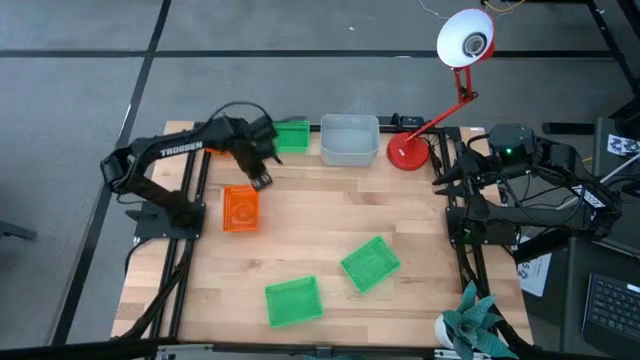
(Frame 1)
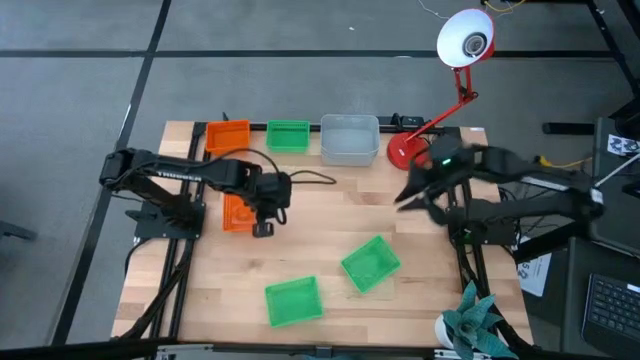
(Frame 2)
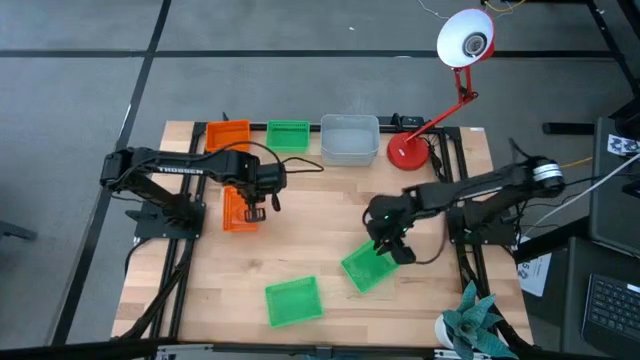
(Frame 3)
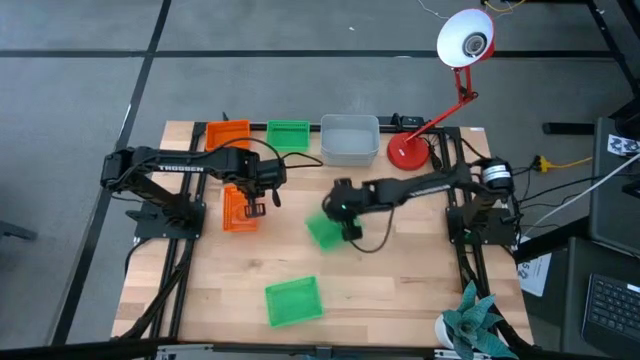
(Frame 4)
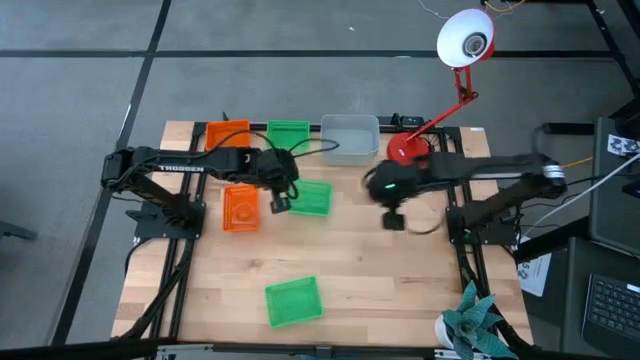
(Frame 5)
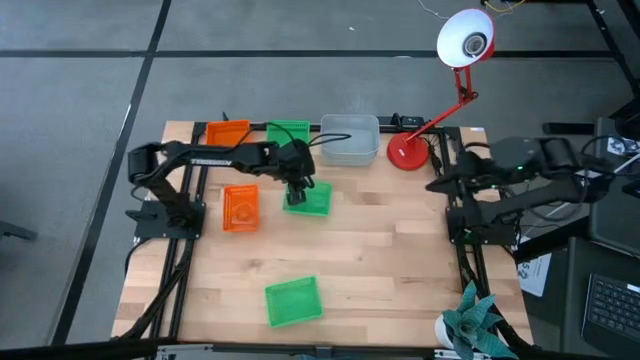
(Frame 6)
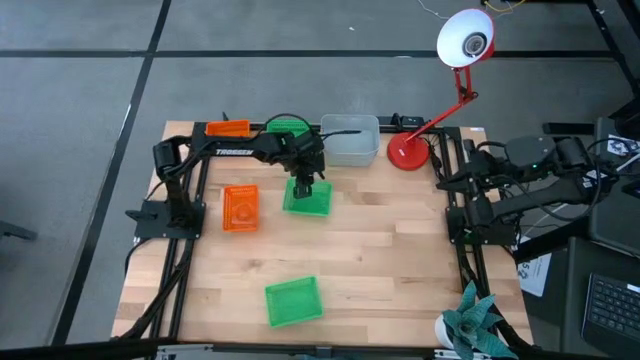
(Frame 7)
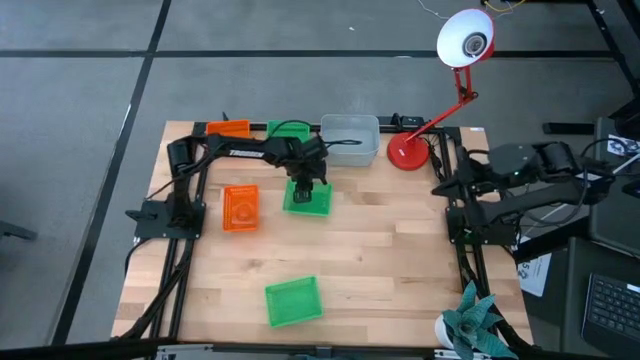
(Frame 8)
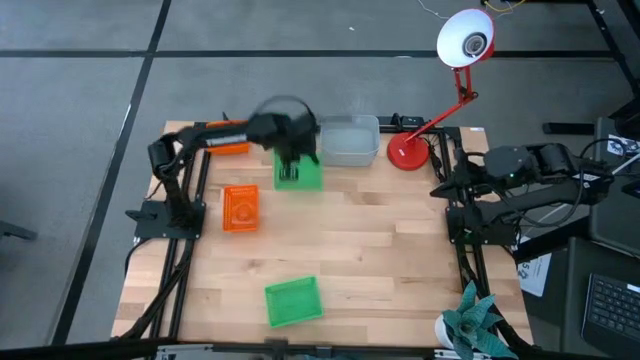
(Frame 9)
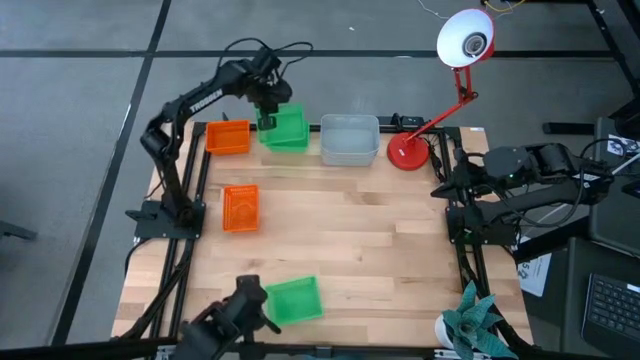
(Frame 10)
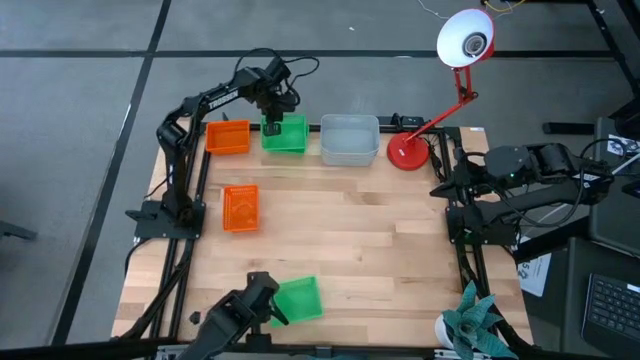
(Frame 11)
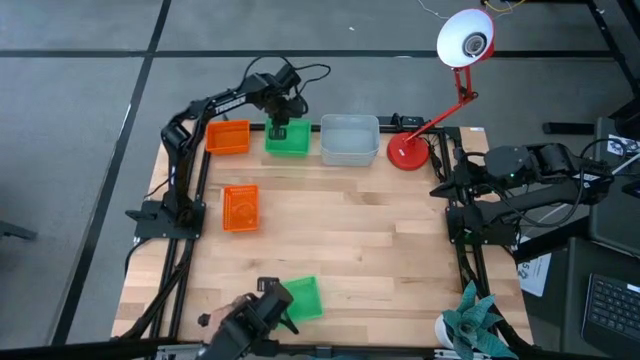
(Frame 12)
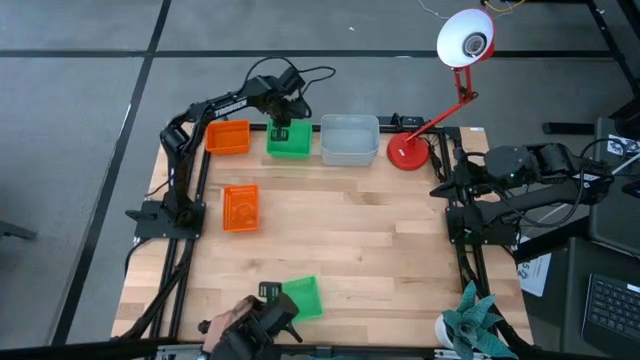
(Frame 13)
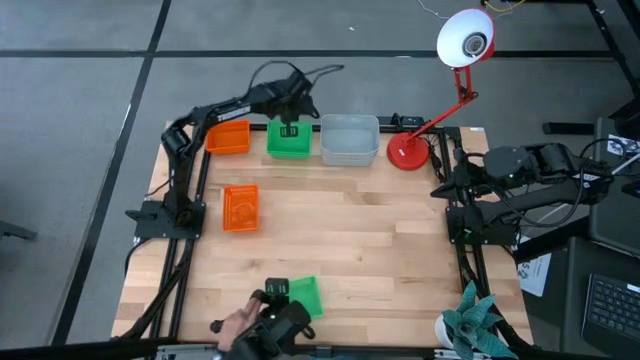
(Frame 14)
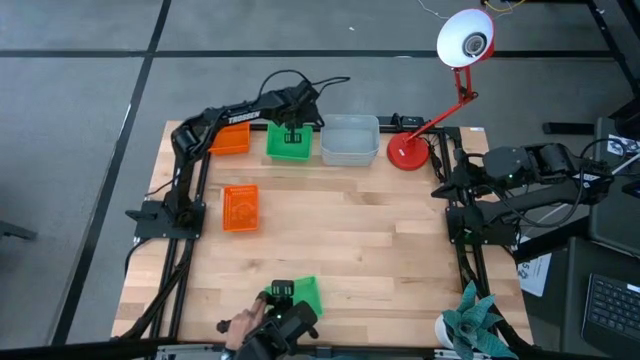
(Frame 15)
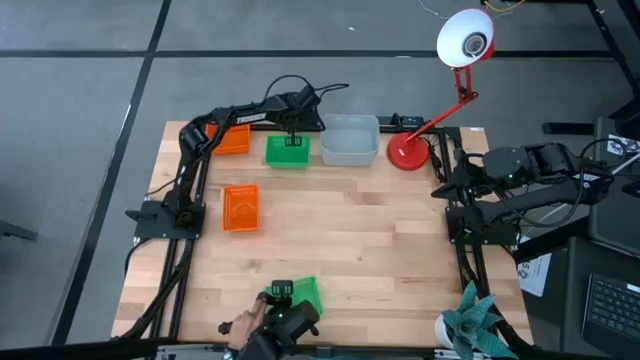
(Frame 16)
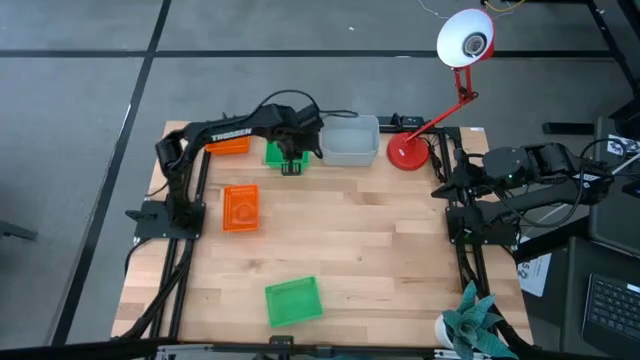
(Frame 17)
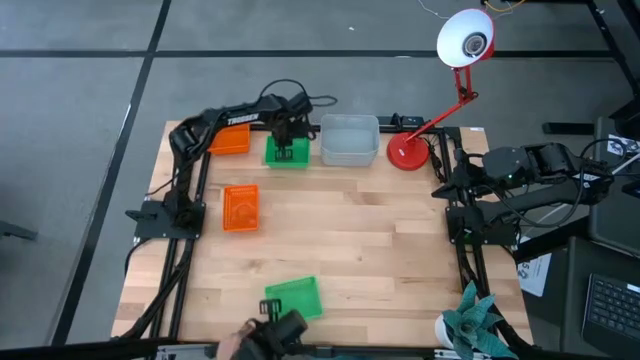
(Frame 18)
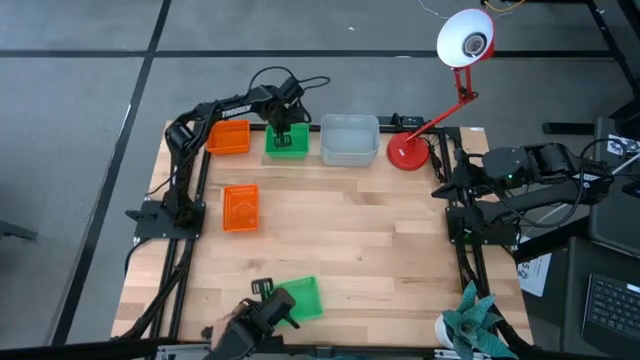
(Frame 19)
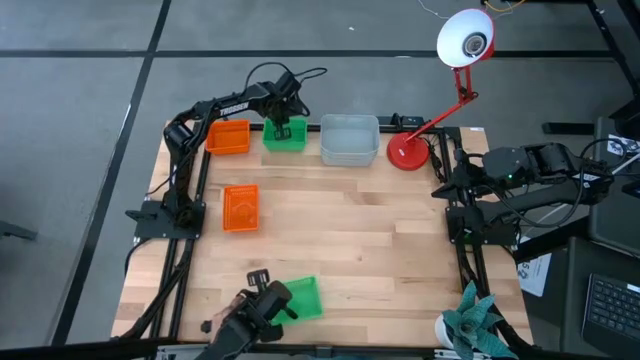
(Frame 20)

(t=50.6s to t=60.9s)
Stack the bottom right green bin on top of the top green bin

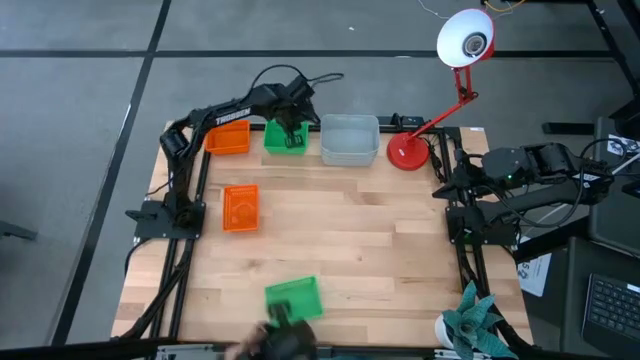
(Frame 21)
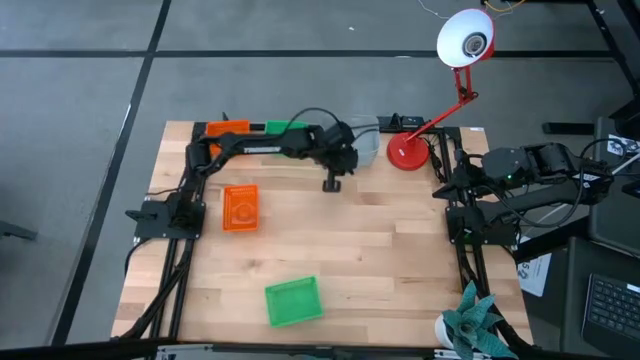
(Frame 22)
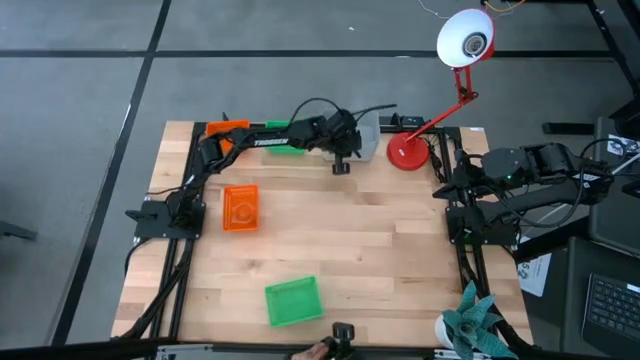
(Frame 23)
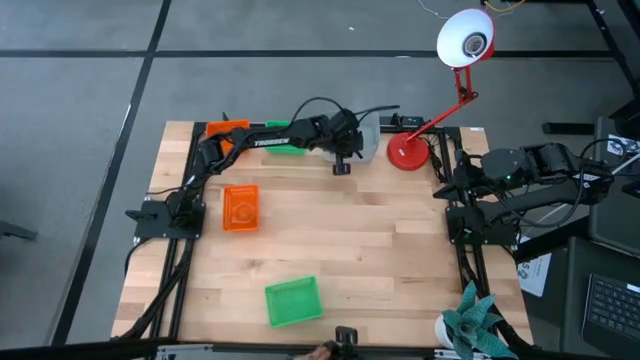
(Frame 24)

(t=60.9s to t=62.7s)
Adjust the stacked gray bins

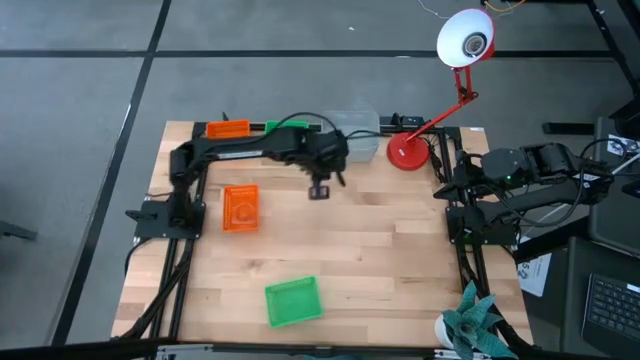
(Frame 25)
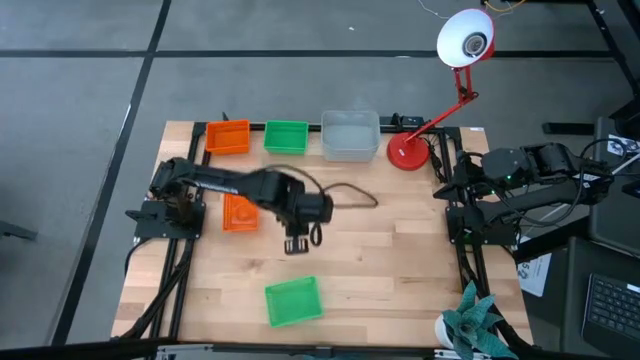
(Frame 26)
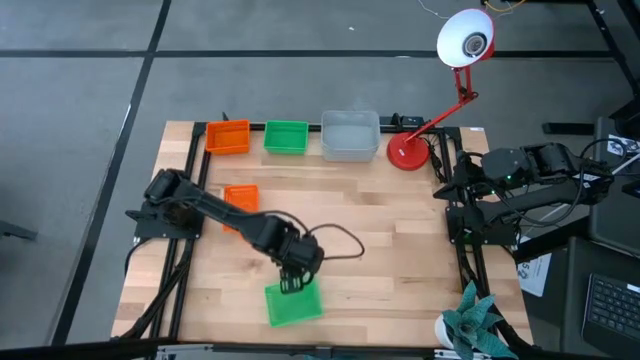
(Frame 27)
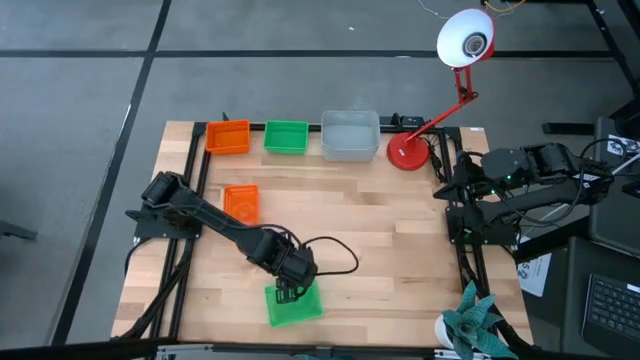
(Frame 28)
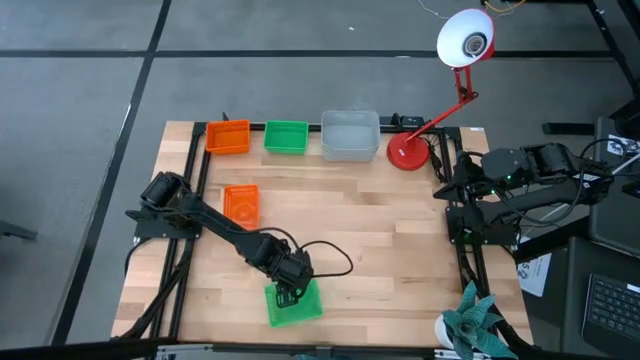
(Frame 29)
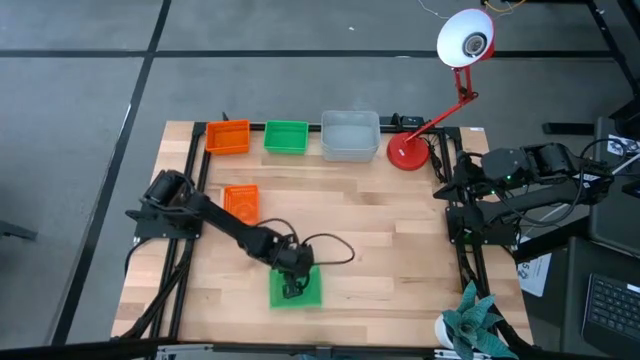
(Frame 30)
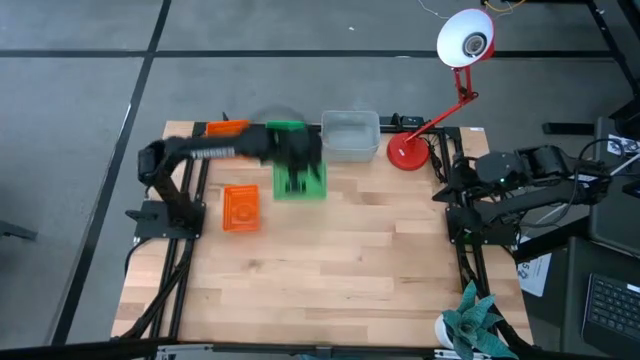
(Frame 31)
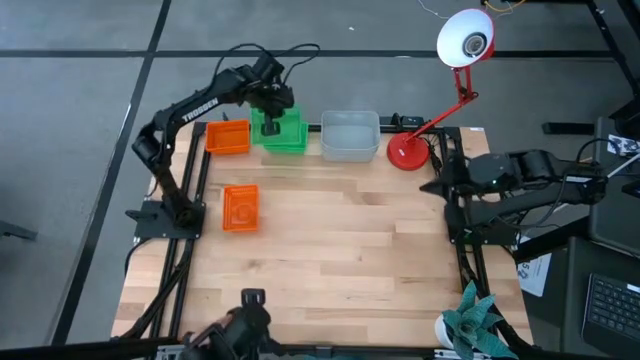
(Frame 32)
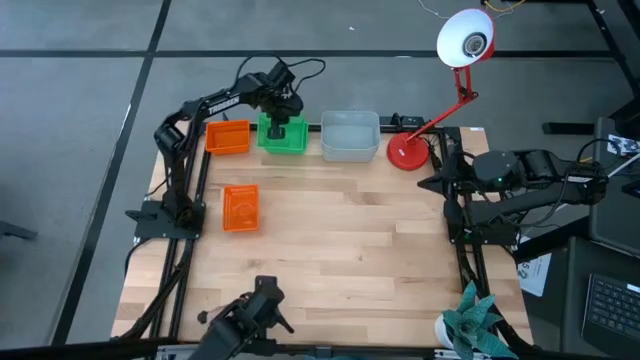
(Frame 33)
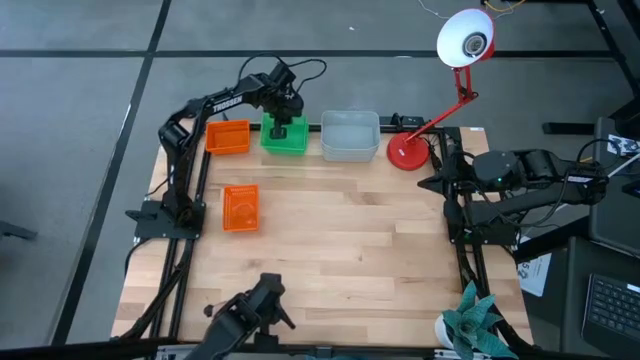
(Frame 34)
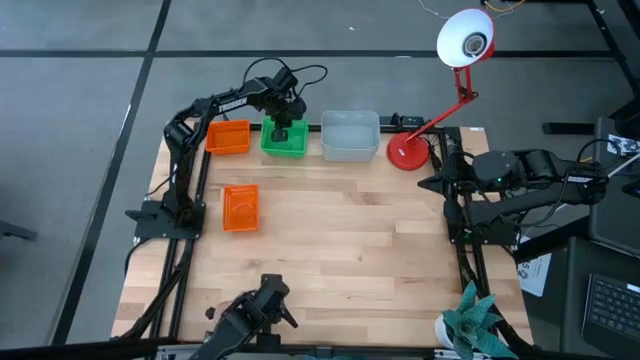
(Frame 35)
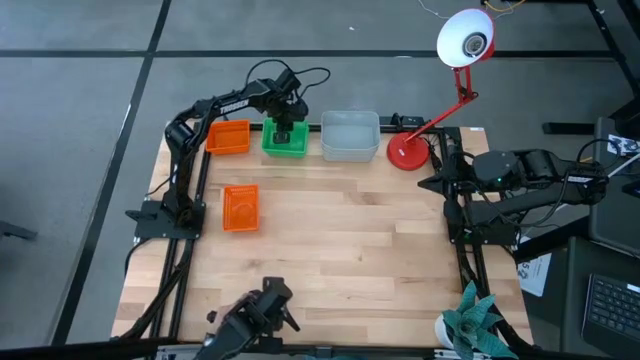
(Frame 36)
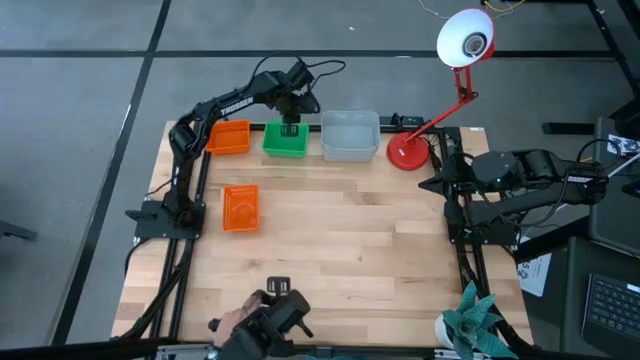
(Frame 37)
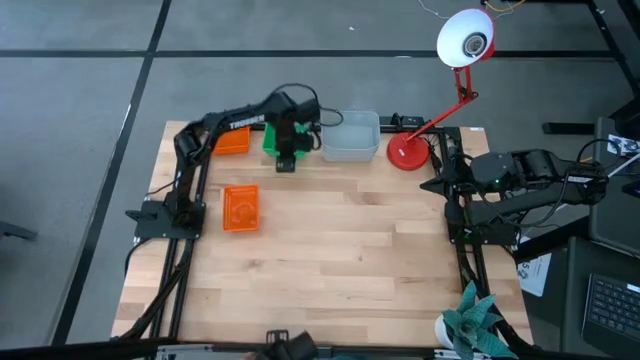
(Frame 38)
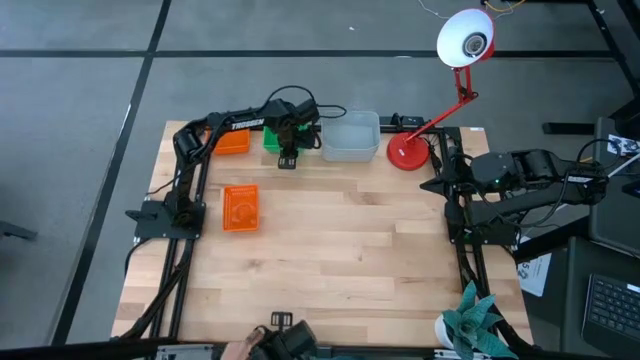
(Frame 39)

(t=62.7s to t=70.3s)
Stack the bottom green bin on top of the top green bins
